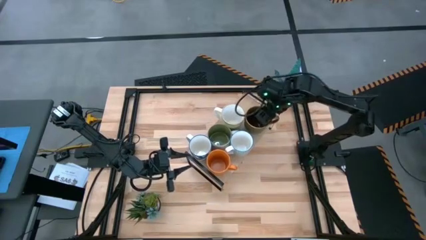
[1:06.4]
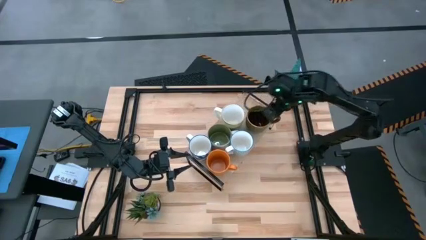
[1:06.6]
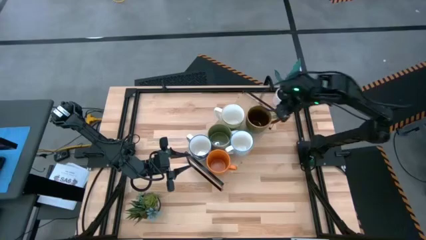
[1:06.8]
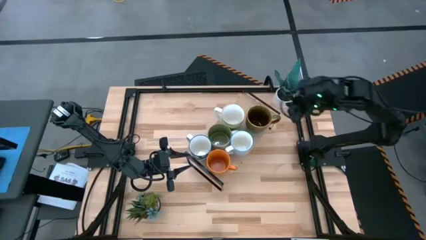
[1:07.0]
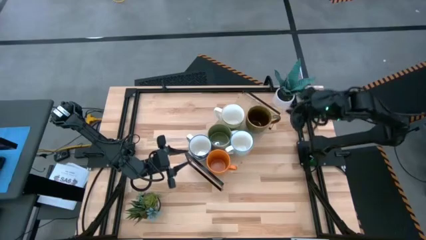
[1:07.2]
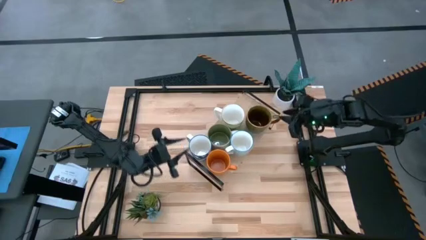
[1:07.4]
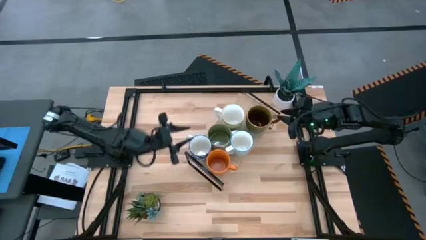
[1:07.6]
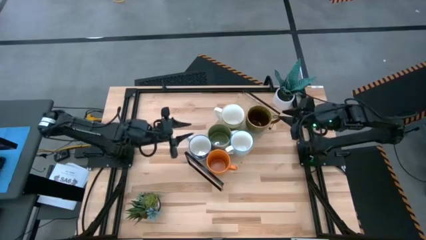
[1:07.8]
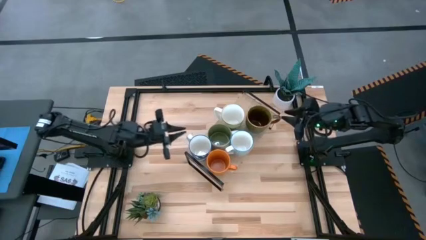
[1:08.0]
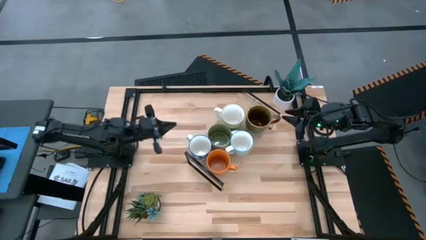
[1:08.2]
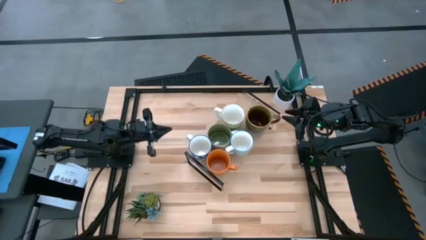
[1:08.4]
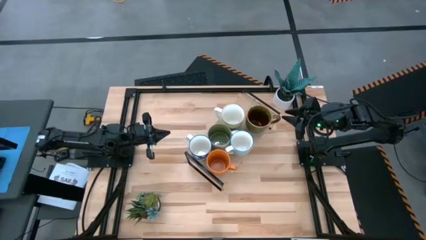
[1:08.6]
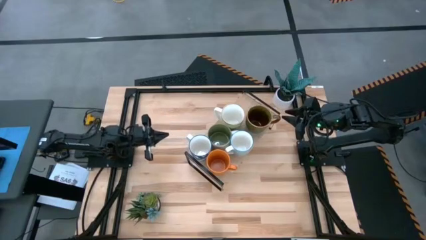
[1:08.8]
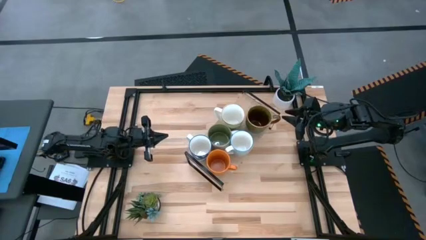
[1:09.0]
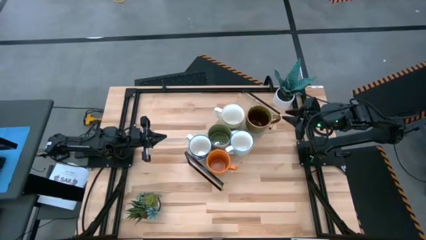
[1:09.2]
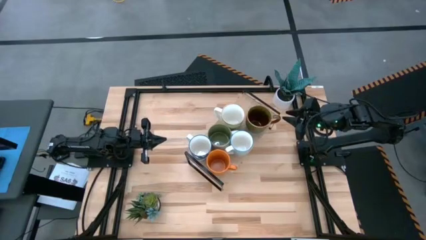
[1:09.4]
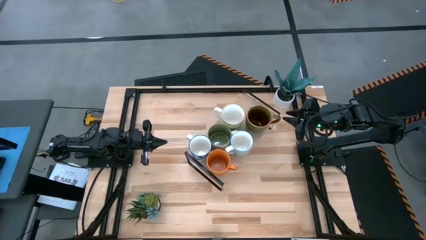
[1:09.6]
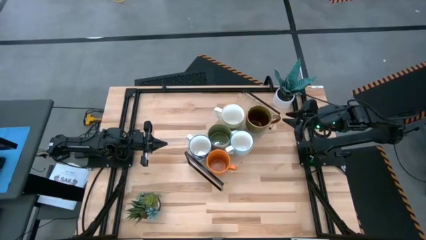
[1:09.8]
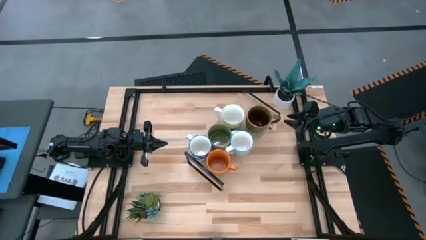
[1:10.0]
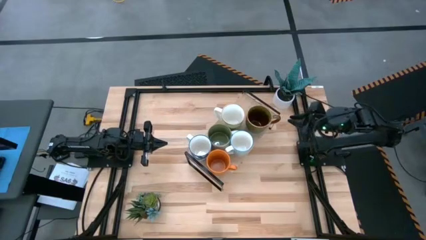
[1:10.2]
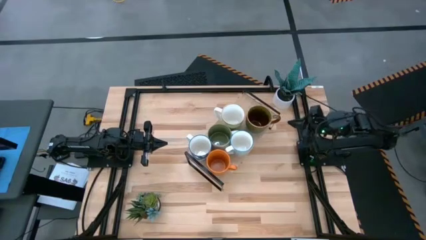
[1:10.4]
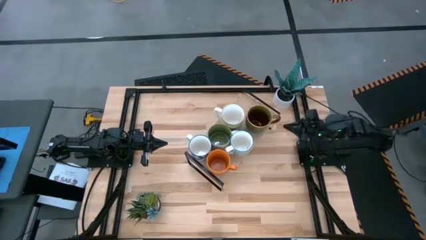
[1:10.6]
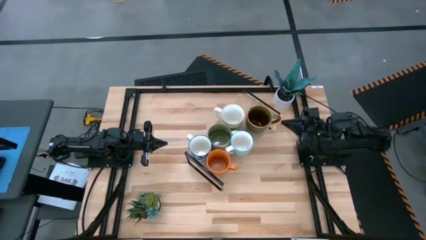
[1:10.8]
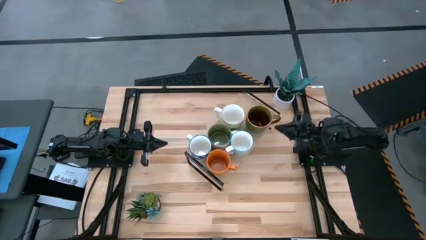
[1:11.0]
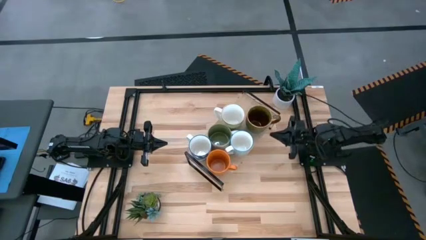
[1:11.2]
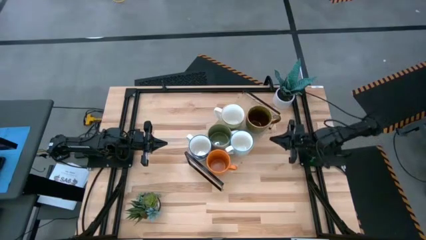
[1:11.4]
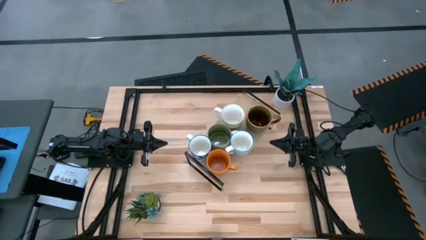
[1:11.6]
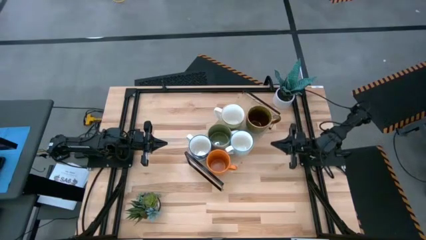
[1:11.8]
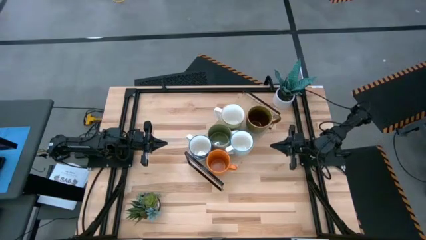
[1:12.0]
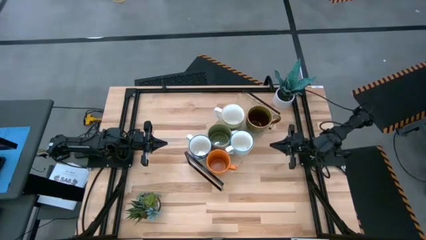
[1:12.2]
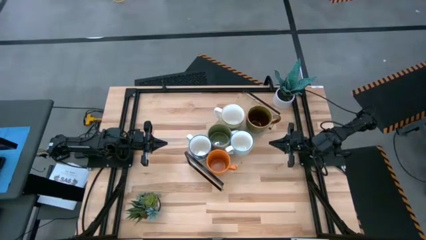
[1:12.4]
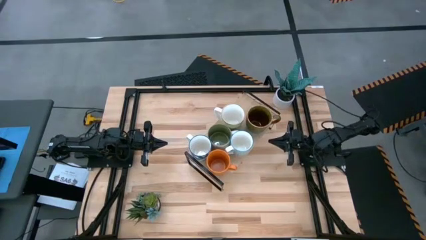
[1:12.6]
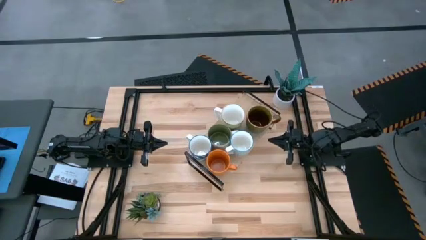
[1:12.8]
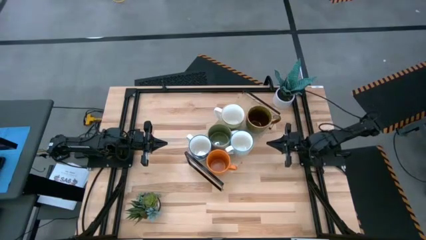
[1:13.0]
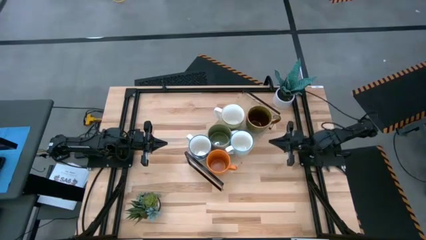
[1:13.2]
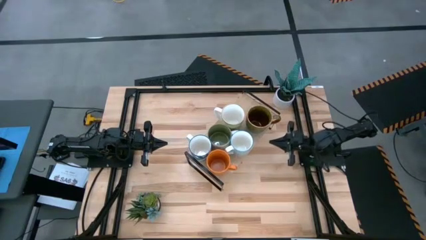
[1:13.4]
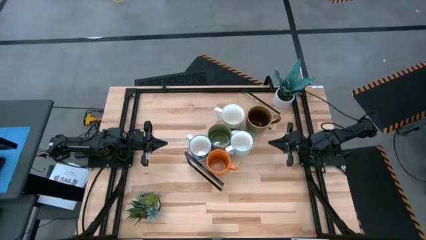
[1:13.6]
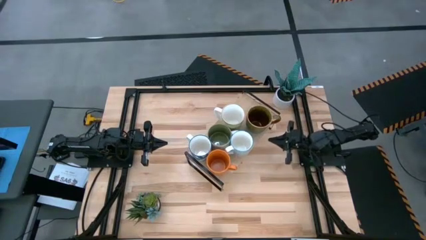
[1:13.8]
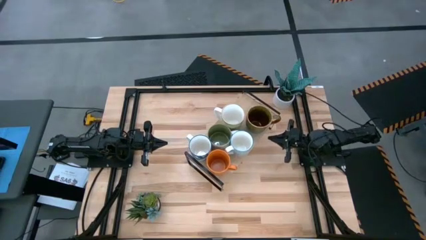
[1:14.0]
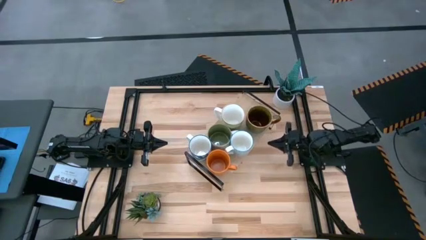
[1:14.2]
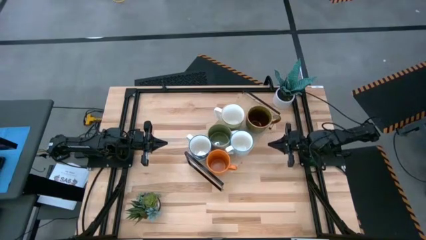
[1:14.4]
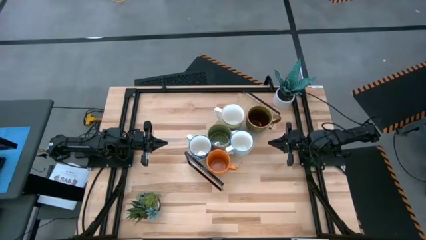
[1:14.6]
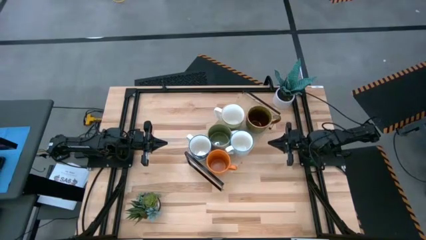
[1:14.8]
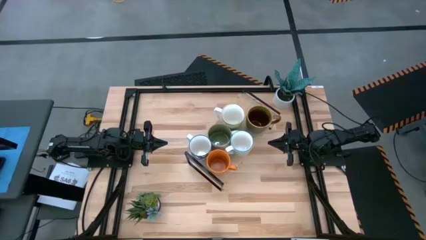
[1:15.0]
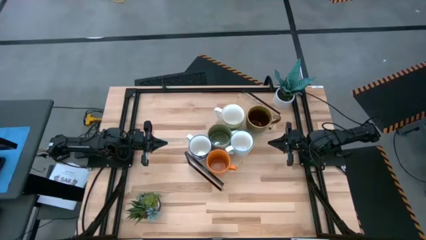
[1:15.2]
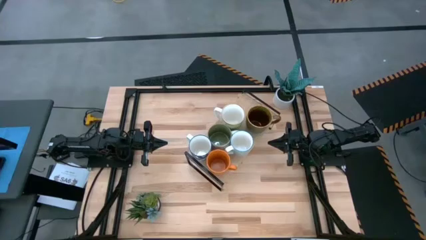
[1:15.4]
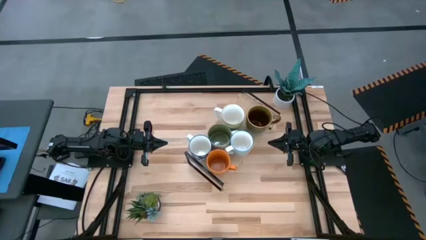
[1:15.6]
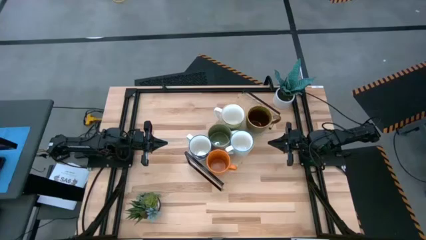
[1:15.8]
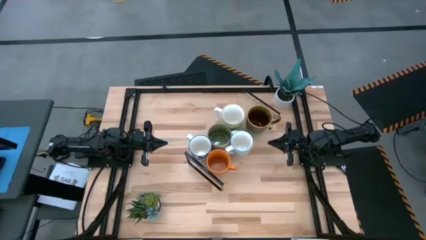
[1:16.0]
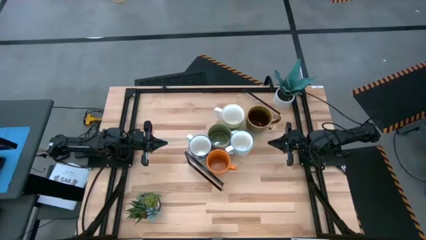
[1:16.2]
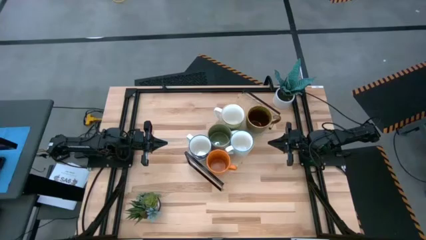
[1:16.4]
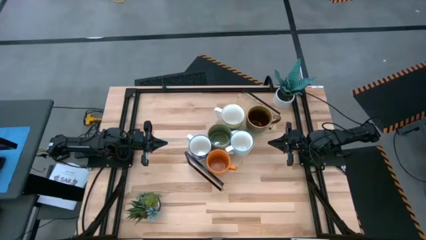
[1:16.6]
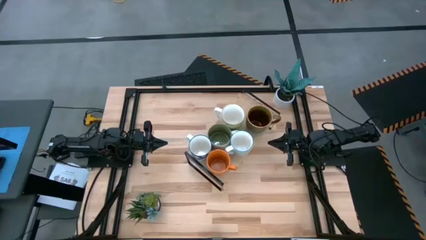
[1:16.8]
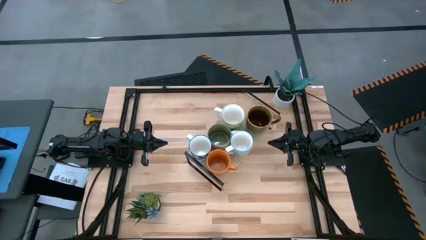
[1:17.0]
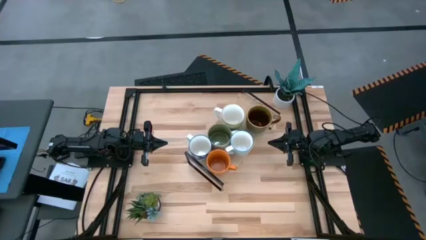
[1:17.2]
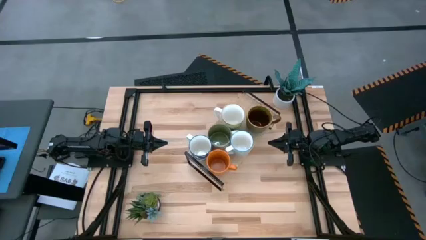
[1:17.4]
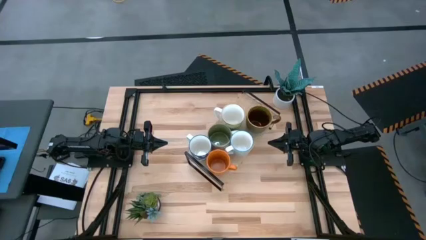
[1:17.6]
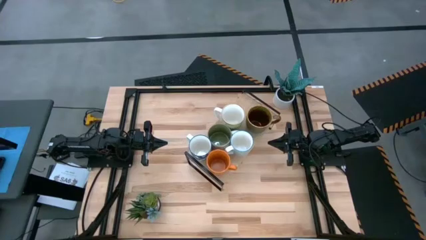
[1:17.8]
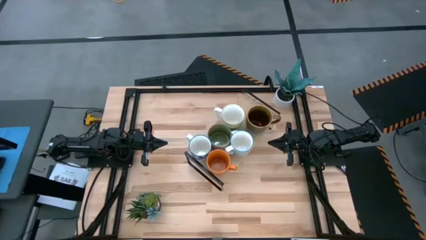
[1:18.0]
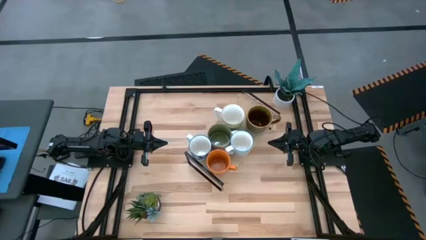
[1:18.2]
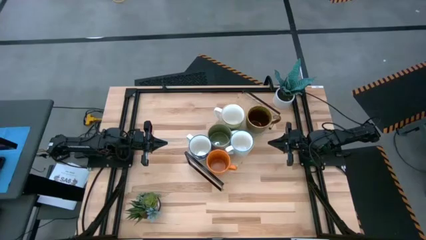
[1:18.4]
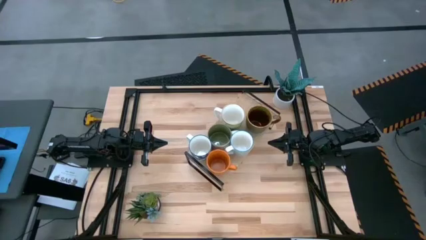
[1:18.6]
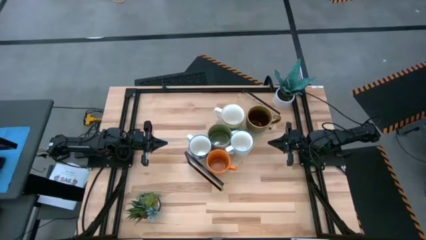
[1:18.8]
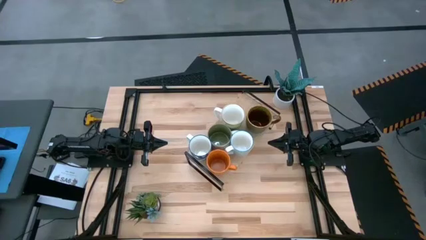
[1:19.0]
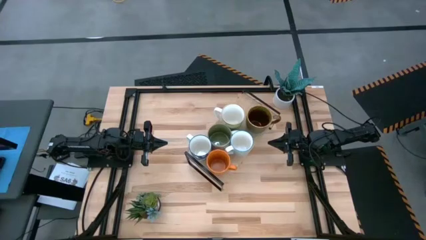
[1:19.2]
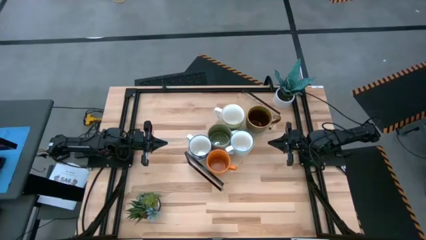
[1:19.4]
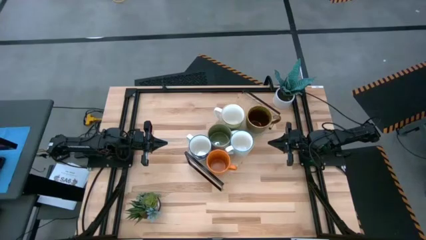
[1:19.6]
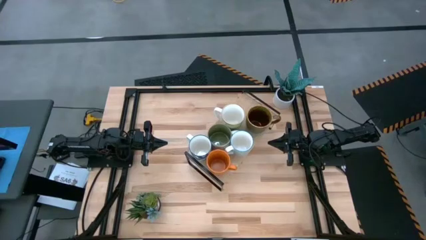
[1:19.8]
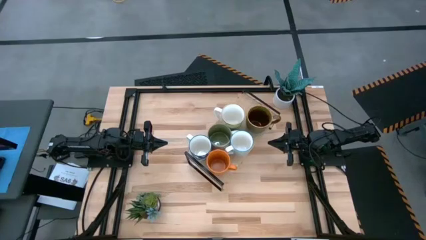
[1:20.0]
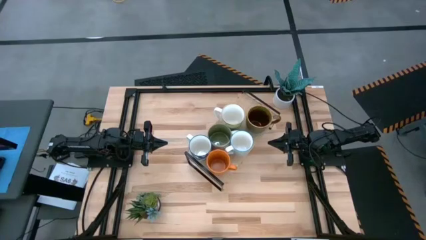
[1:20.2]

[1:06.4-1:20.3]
Task: Place coffee mugs
Return to Home Position
